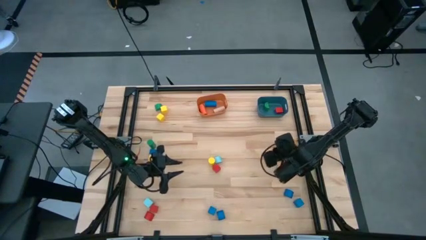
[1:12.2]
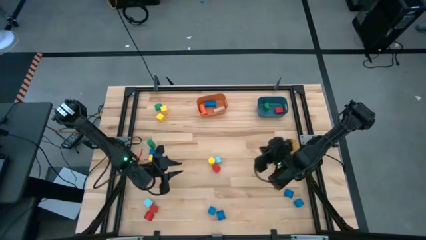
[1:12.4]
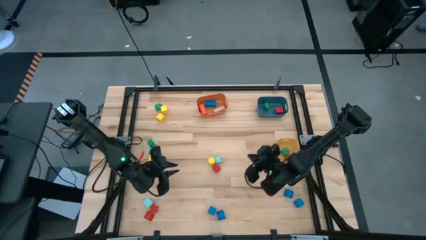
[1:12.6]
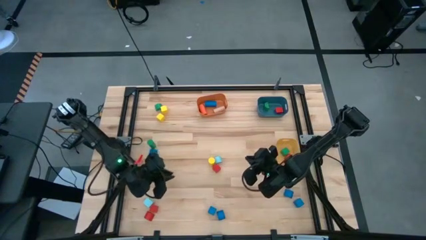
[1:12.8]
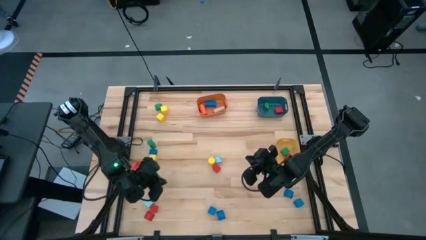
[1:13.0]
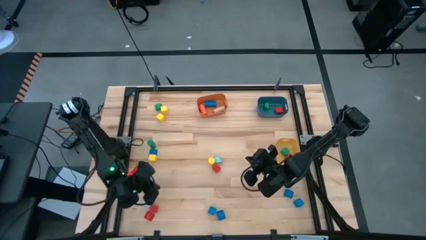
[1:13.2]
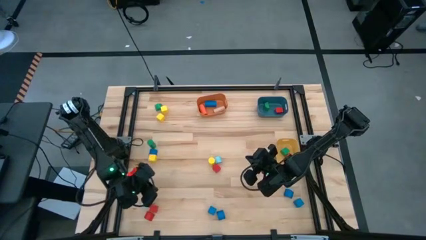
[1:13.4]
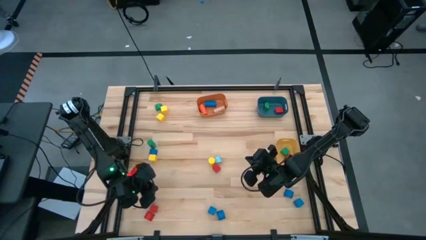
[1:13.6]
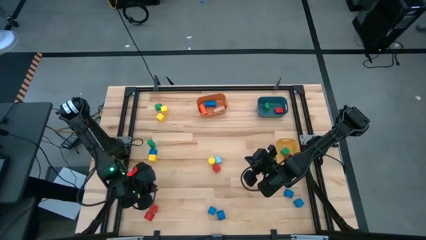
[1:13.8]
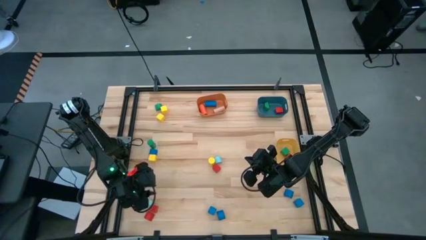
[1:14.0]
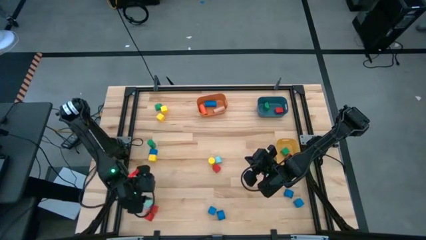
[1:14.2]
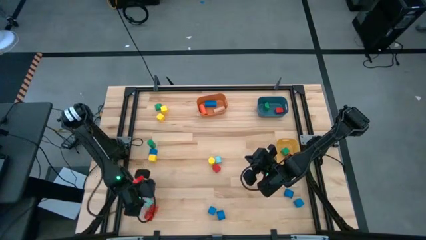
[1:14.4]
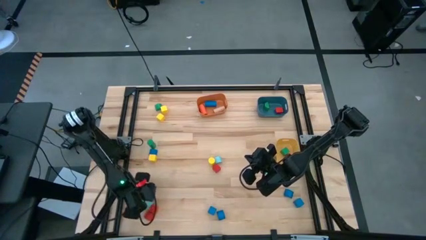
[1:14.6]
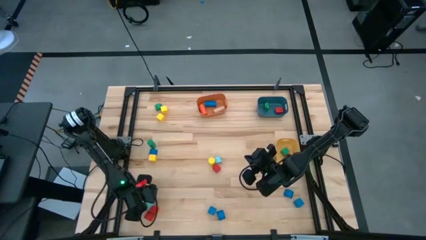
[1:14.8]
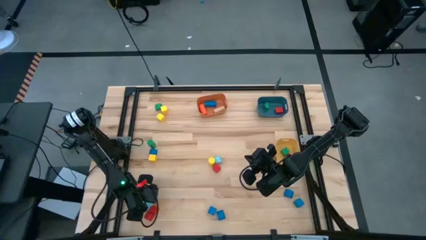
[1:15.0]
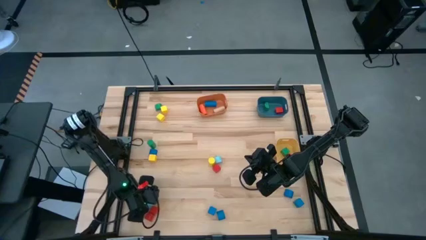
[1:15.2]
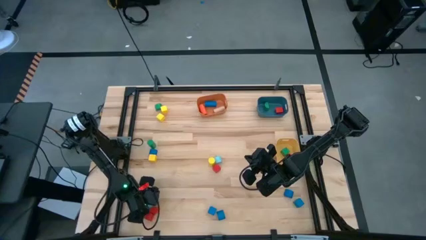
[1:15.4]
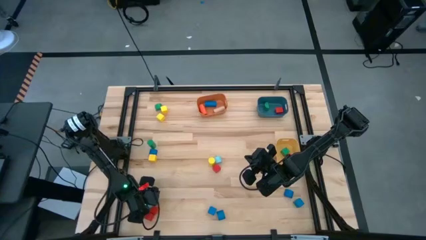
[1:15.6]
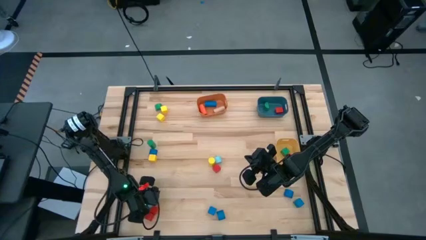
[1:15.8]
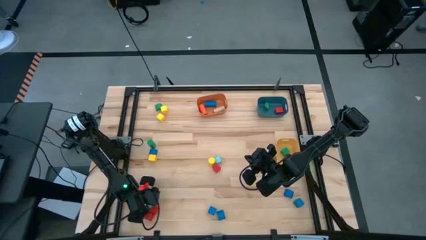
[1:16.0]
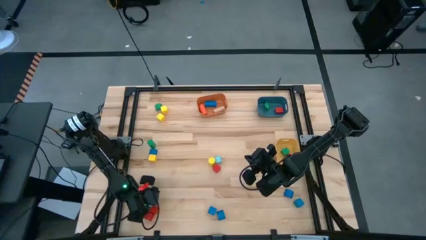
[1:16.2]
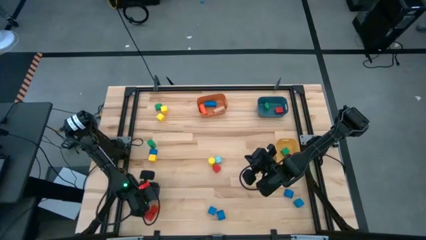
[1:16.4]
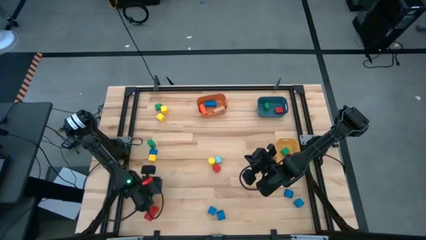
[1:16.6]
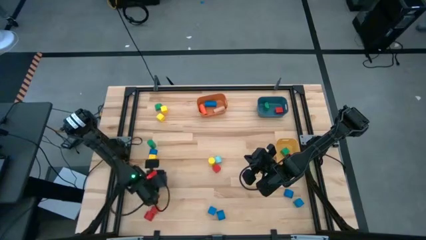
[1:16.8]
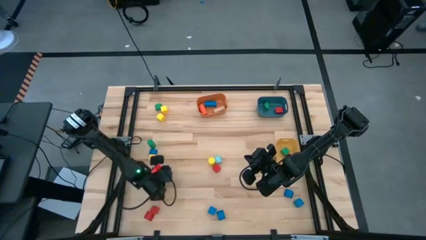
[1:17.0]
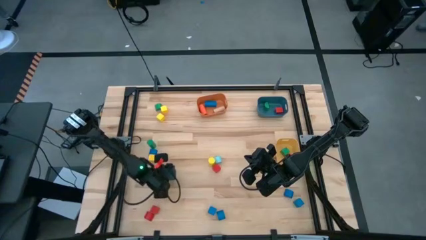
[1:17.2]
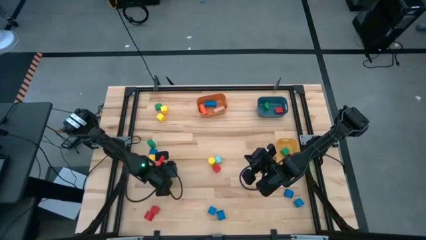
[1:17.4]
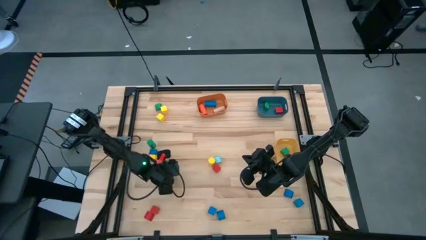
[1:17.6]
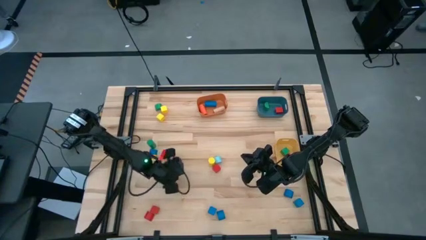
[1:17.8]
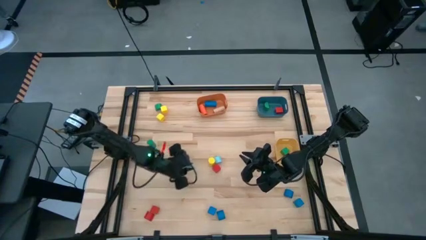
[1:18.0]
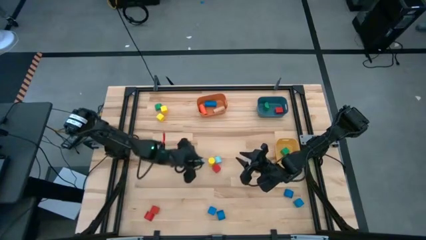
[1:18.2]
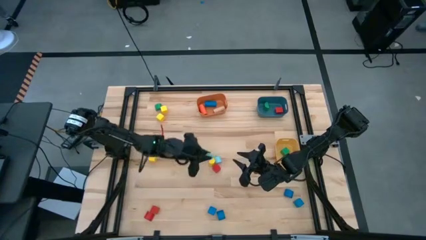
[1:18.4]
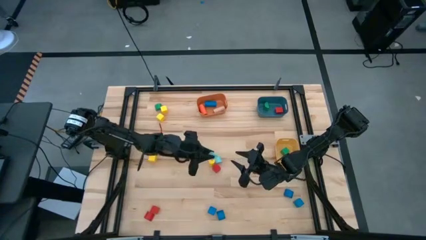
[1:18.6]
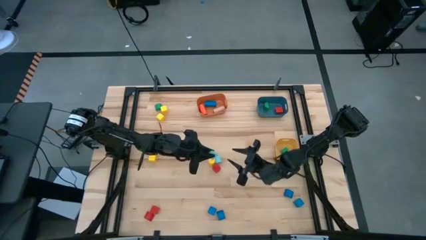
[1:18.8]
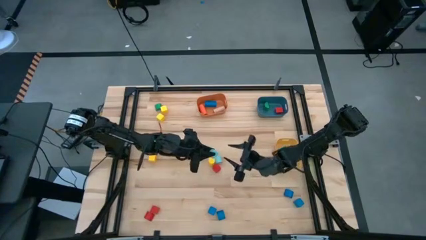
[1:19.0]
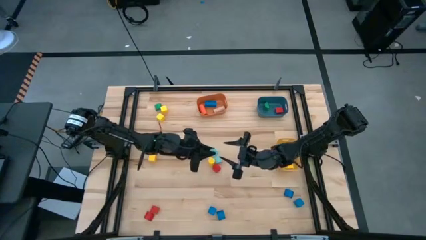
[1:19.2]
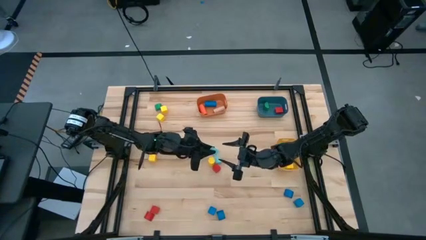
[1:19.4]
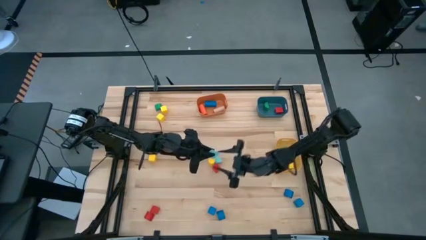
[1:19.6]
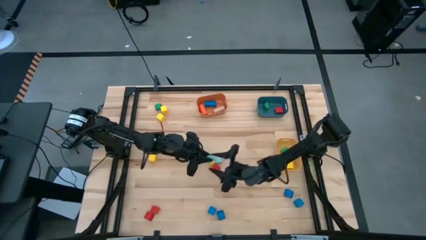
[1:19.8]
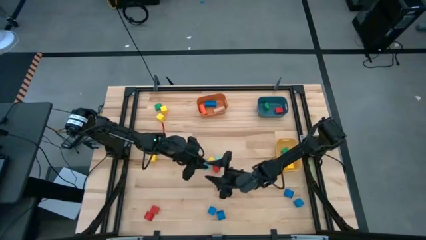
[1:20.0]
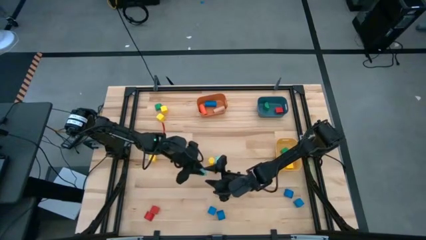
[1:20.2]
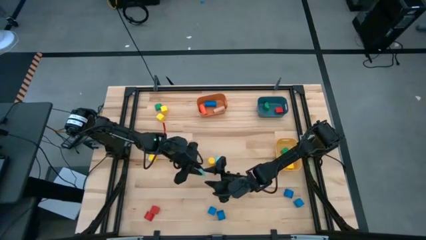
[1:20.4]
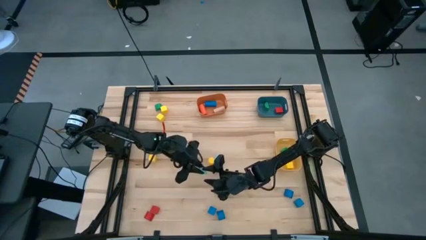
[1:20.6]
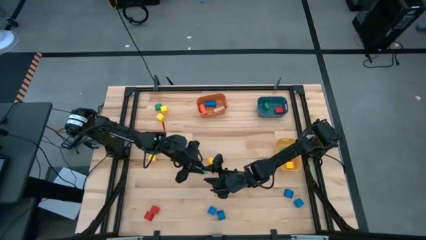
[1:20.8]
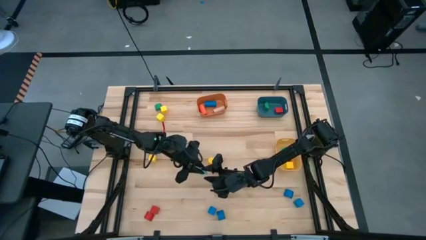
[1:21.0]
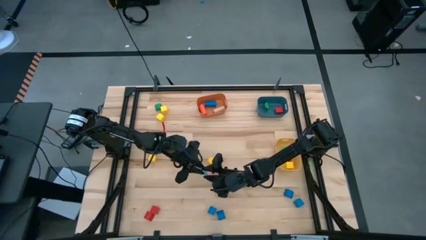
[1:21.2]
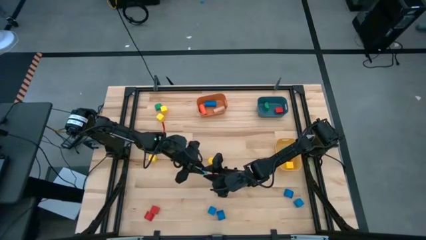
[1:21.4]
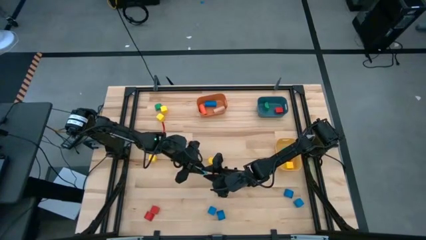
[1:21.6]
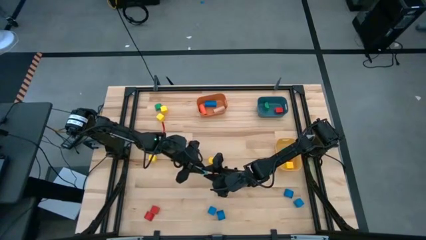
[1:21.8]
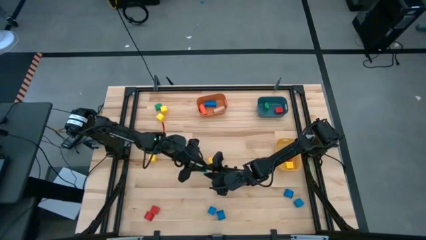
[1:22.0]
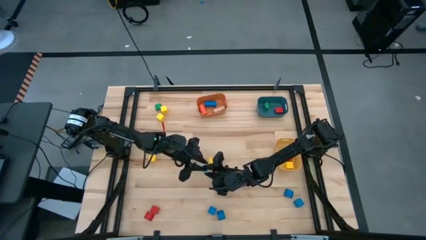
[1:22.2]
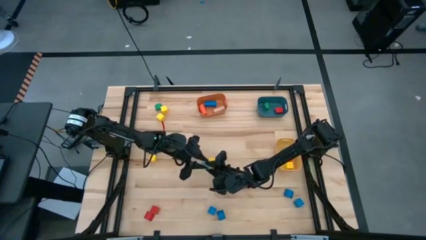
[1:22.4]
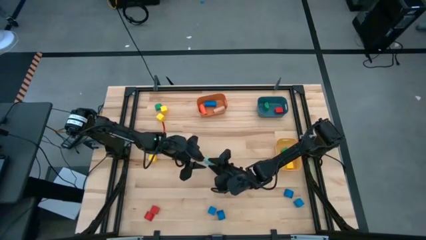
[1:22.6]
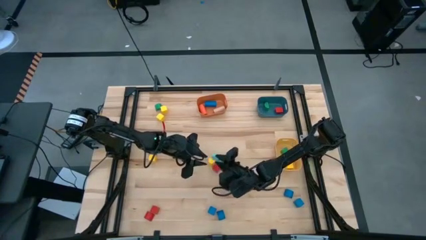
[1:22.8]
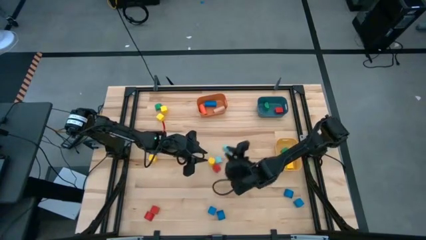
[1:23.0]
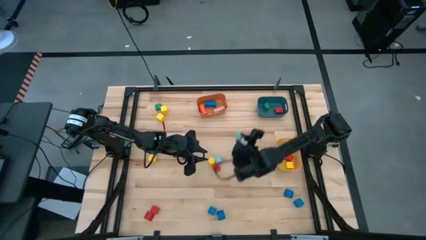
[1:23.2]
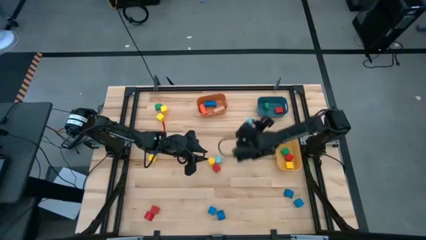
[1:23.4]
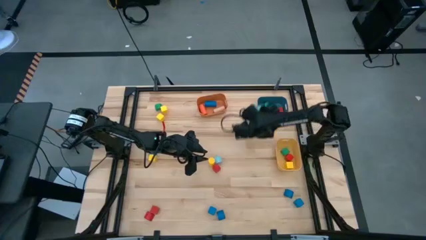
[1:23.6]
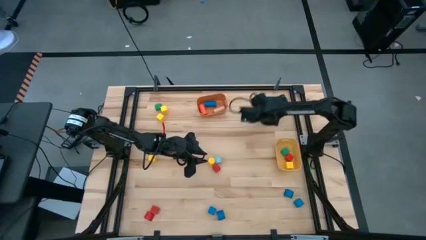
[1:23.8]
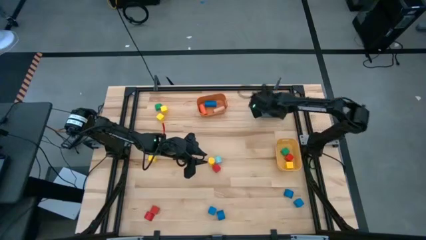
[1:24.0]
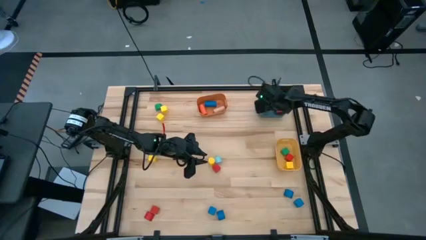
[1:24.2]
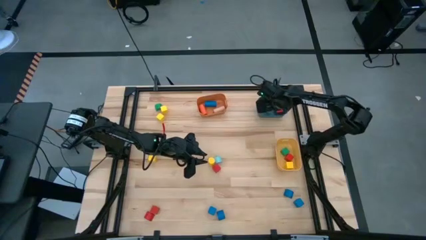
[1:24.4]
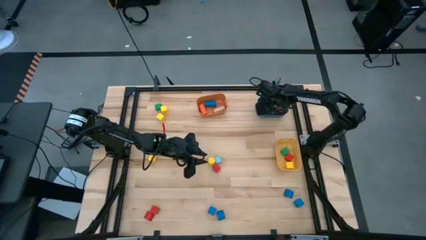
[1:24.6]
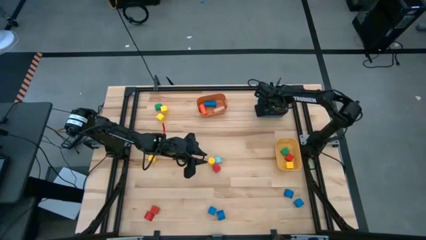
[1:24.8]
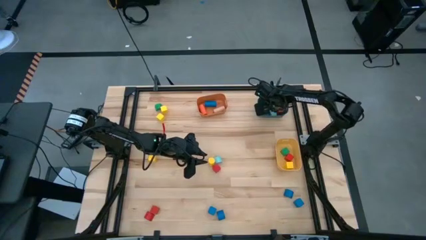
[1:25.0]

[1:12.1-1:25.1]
Task: Sort blocks by size
Put the light blue half circle block into the blue bin

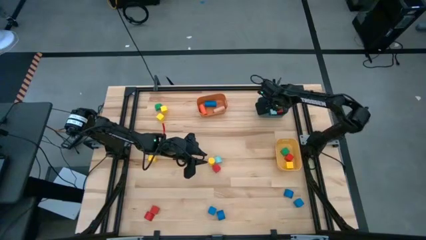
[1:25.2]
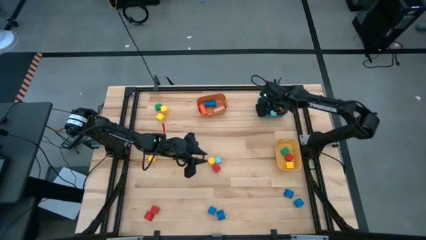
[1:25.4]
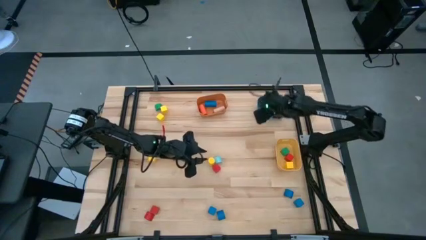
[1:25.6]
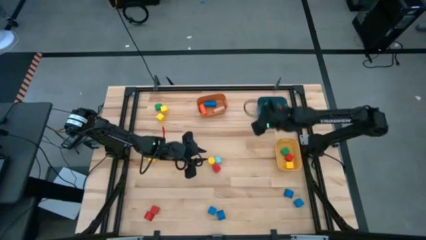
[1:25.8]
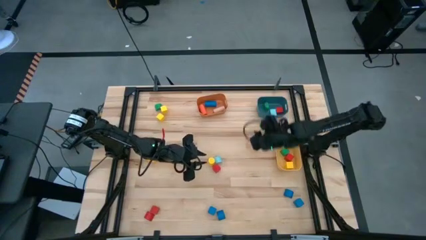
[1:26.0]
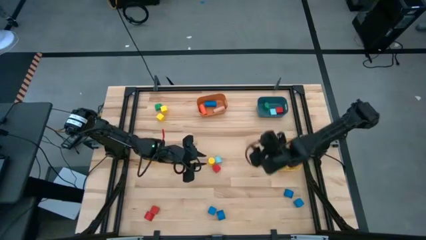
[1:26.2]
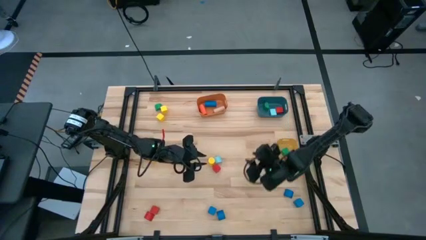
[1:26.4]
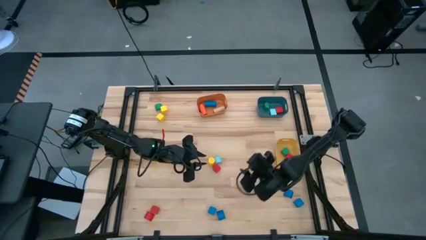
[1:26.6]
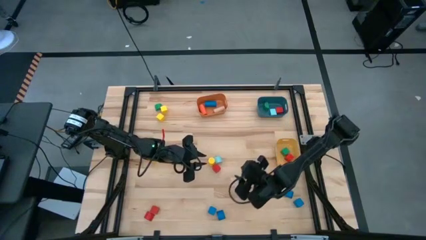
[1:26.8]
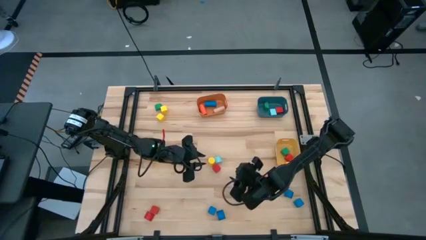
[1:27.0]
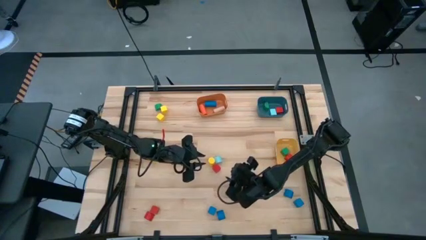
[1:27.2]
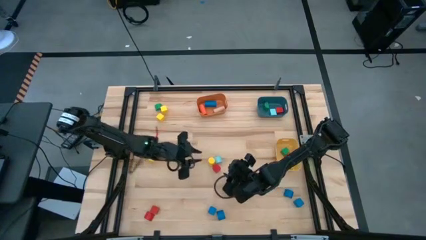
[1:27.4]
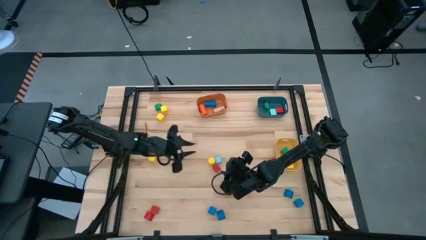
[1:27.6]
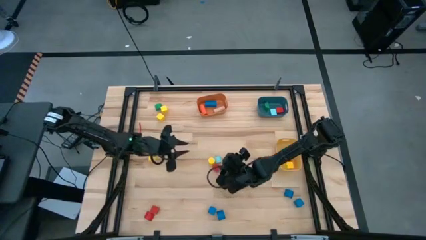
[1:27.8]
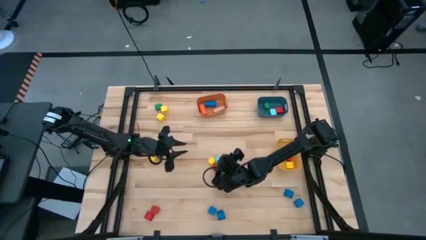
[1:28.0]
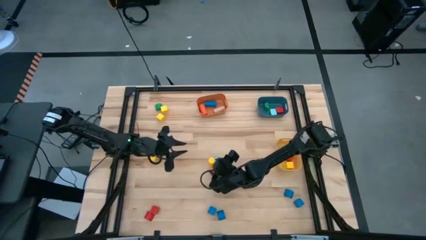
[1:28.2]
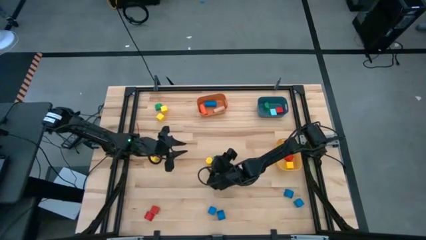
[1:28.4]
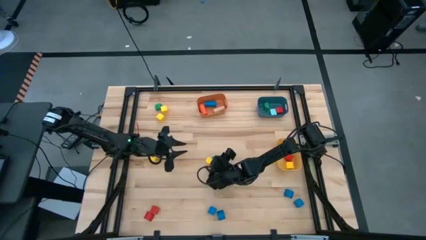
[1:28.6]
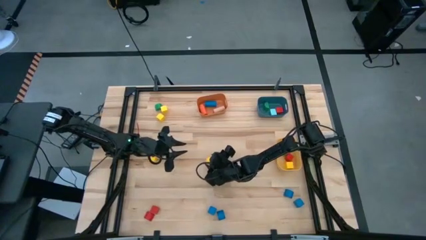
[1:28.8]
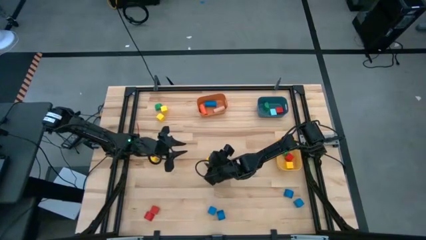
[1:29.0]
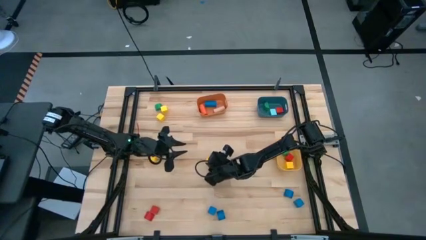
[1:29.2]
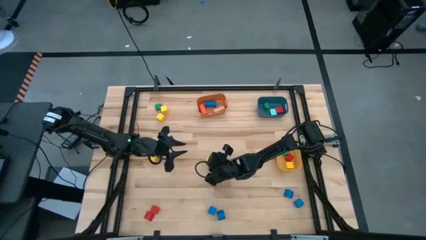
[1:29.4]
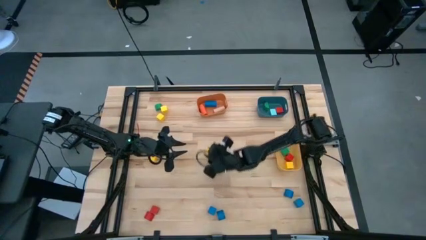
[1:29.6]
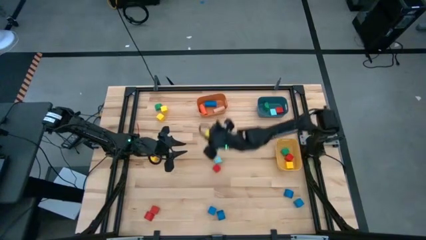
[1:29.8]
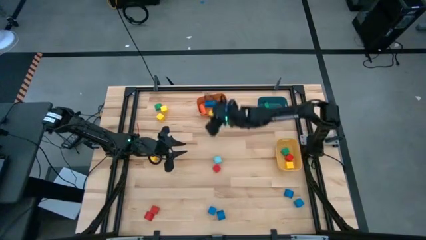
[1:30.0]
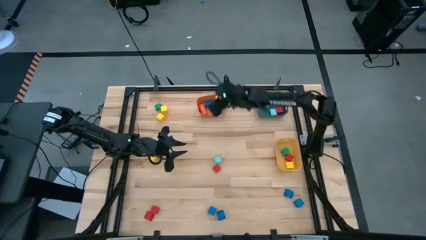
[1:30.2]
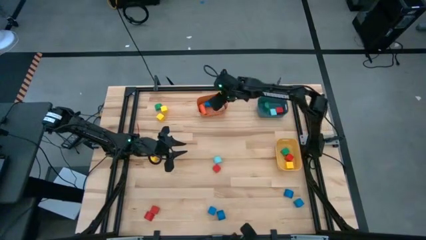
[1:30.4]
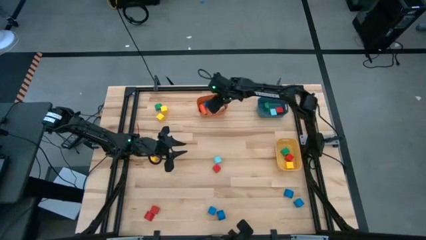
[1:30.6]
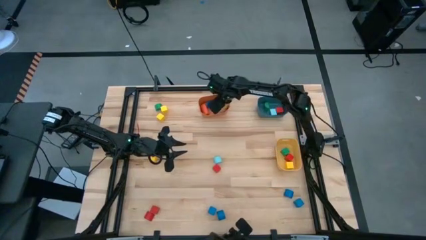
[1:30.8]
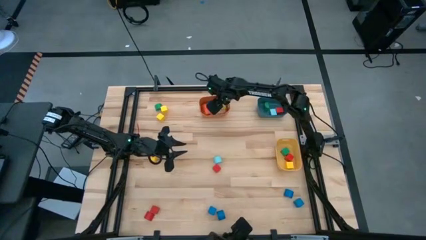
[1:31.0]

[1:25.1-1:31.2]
Put the yellow cylinder block into the orange bin
